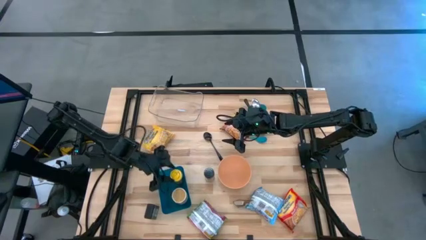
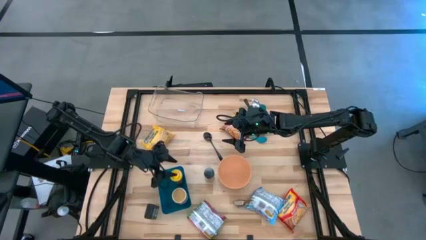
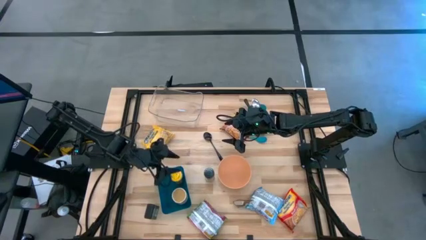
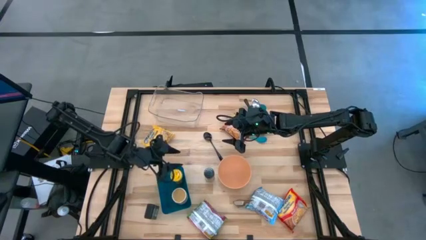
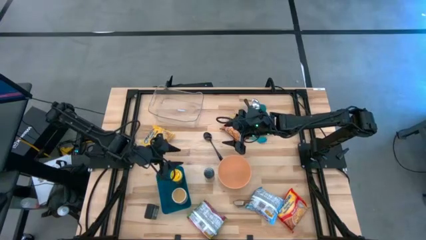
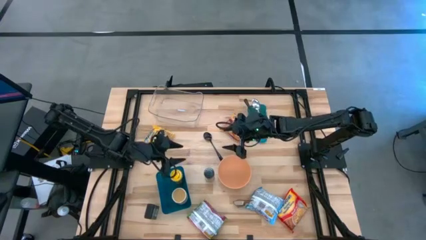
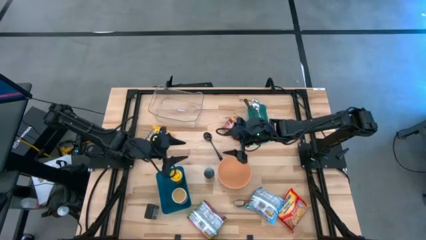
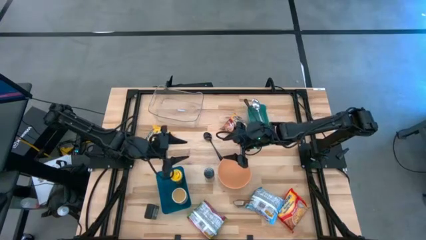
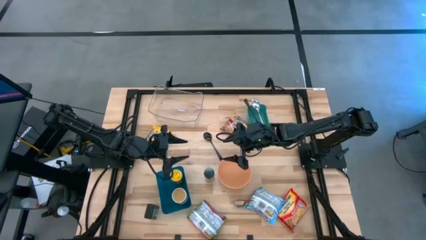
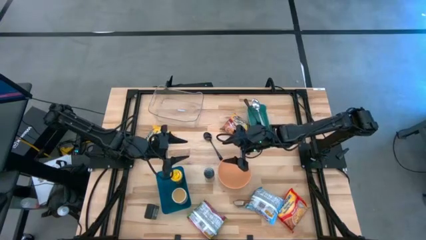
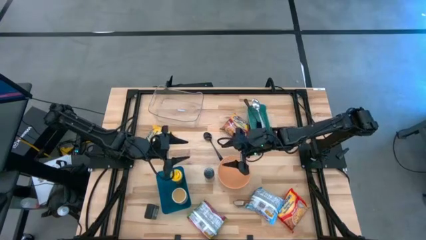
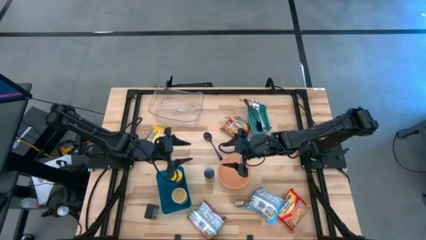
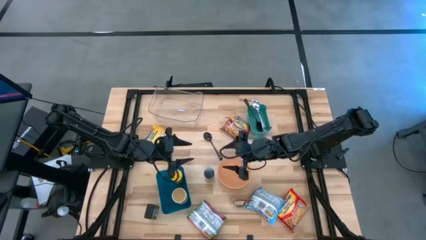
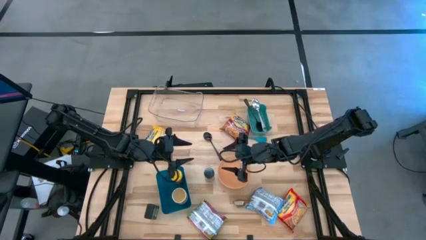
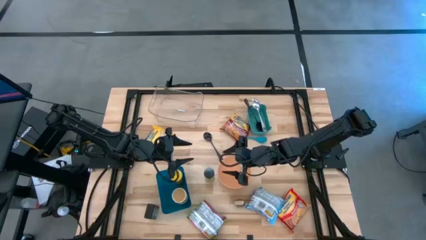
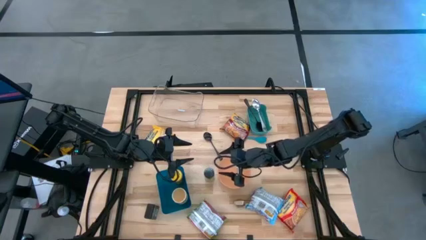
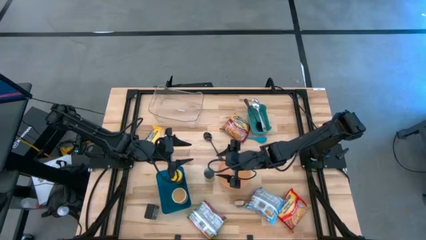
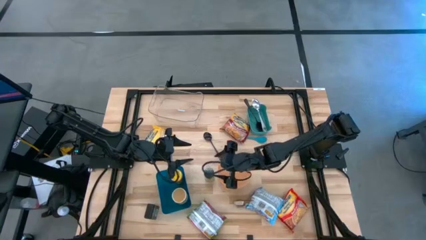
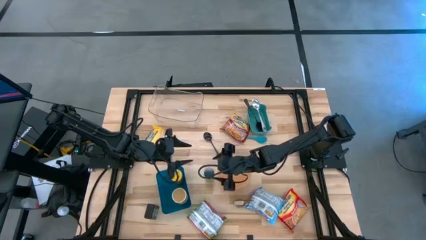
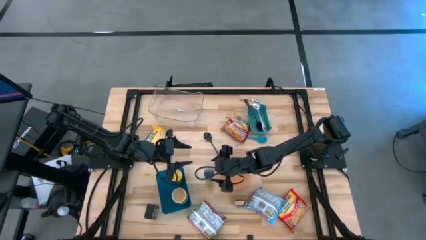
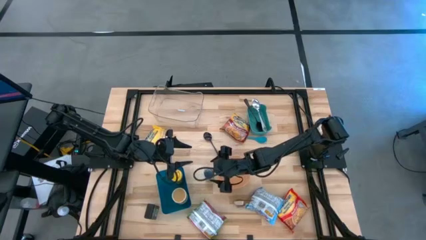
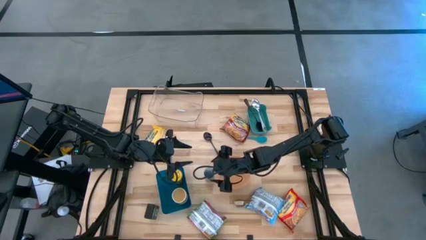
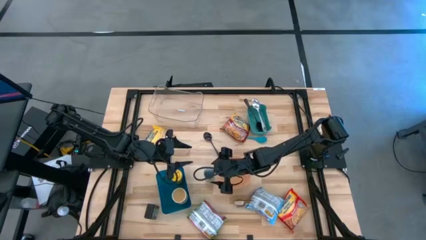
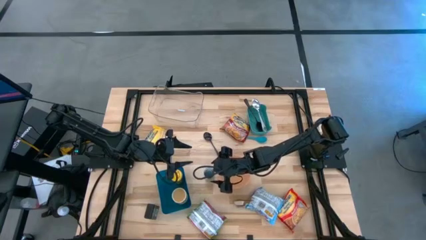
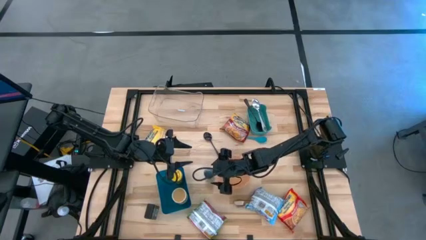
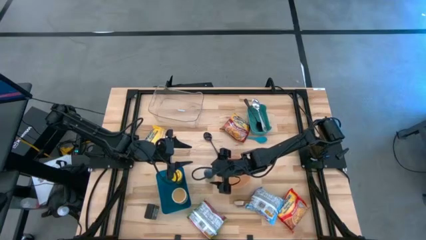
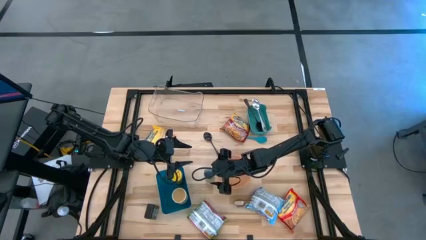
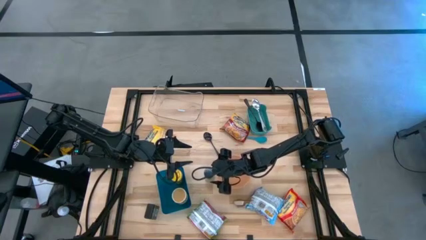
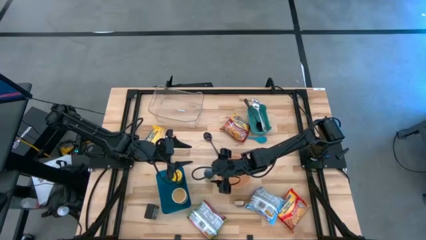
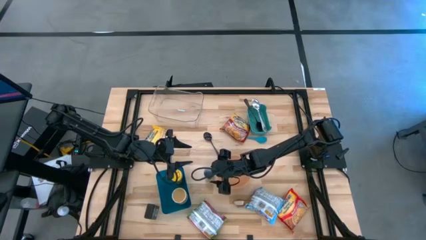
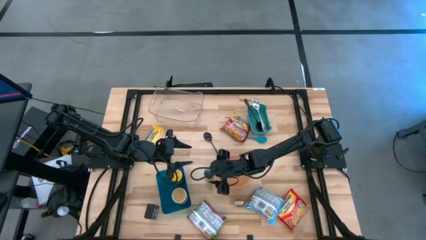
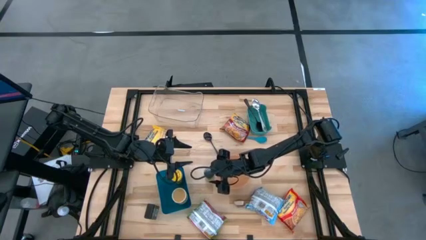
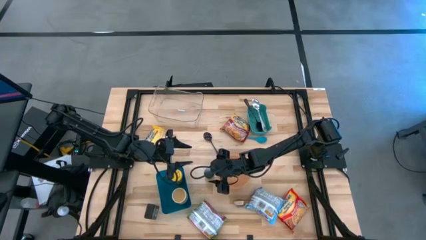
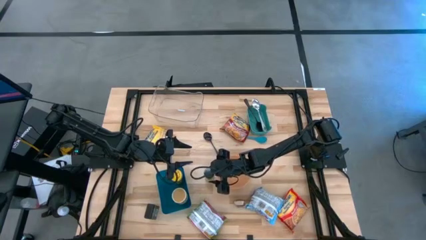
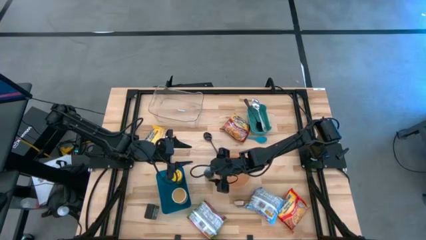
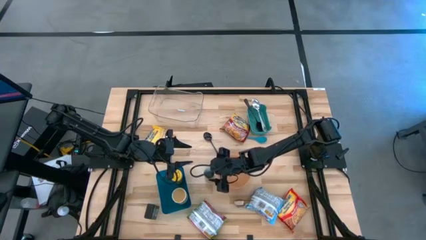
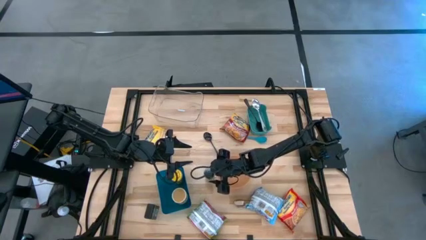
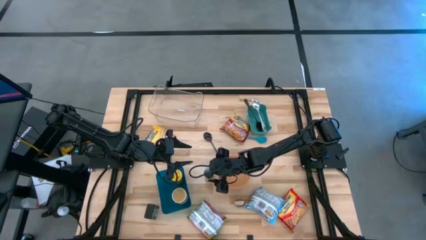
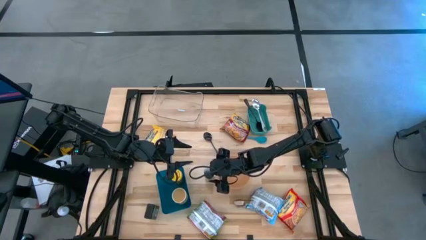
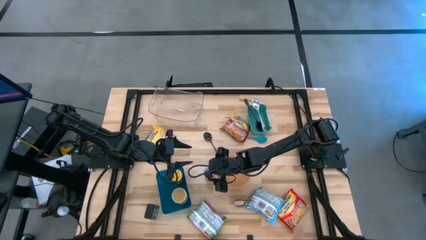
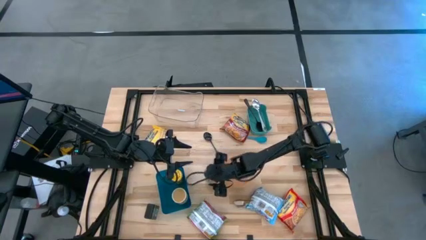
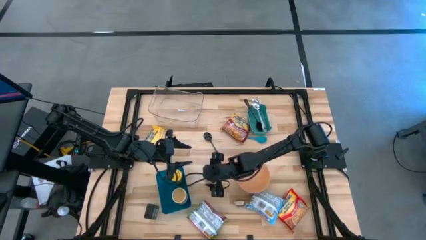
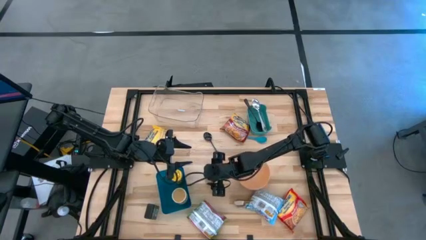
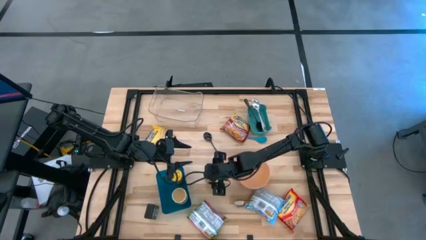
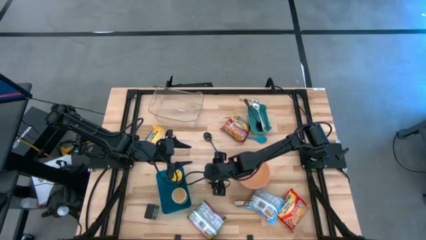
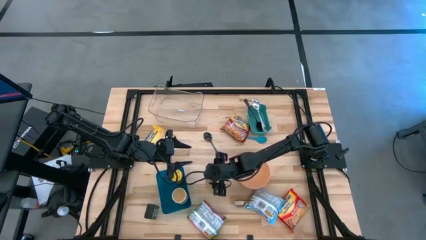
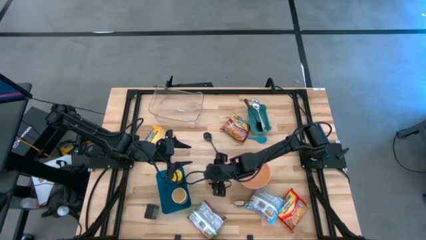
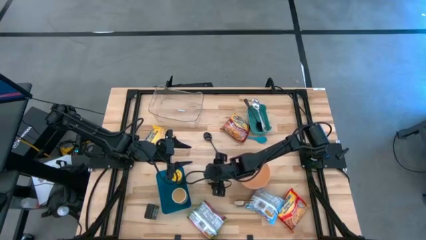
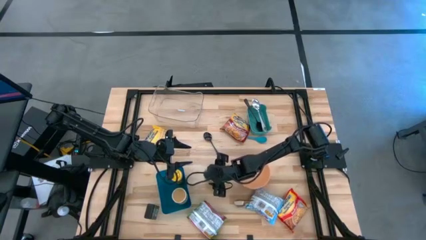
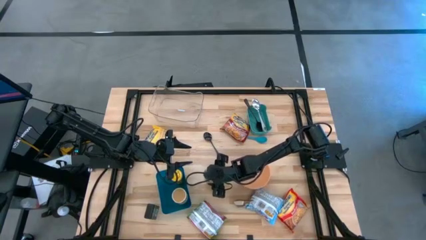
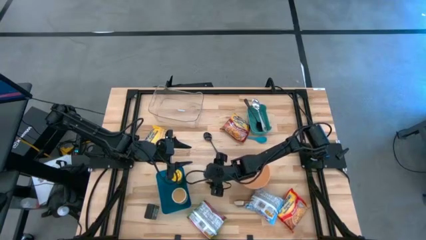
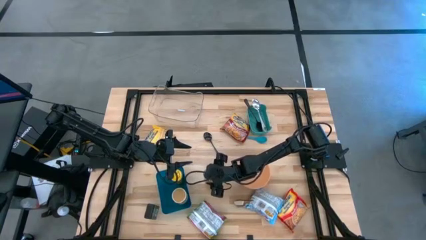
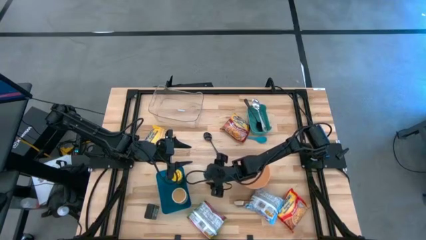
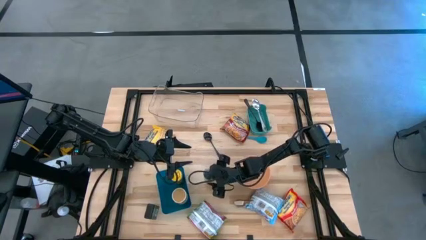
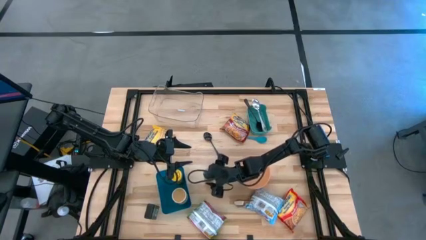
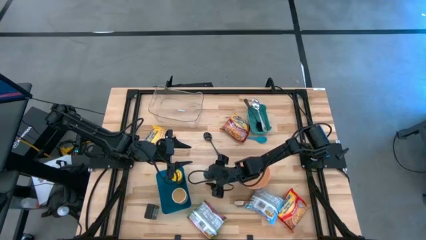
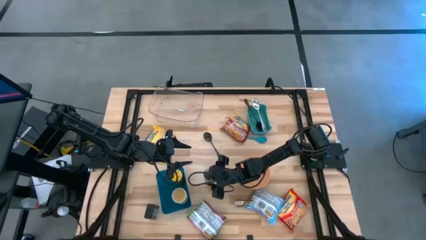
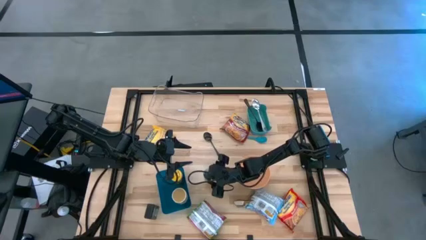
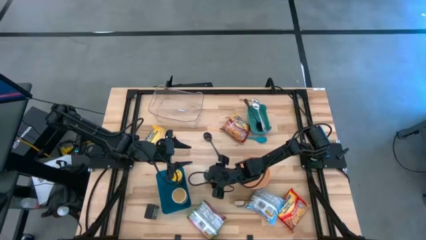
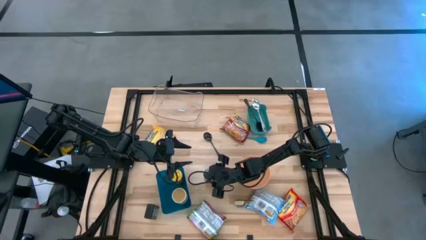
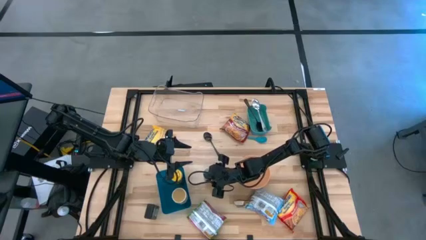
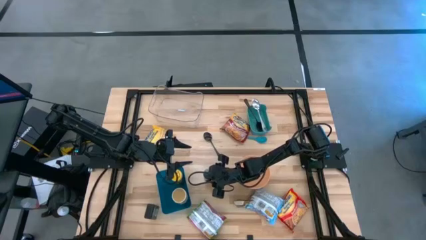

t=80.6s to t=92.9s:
Task: Pick & Place Food Item
Put the green seasoning bottle into the blue bin

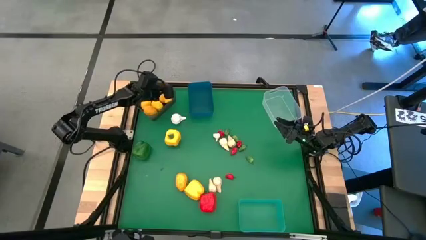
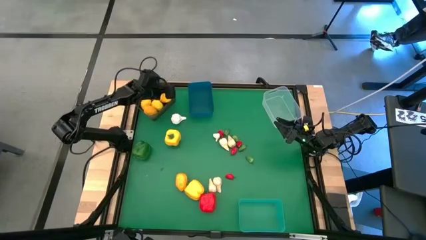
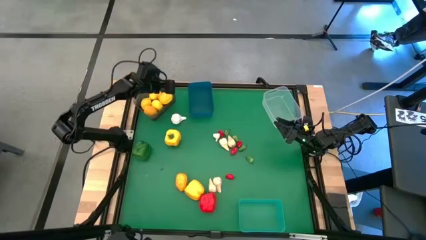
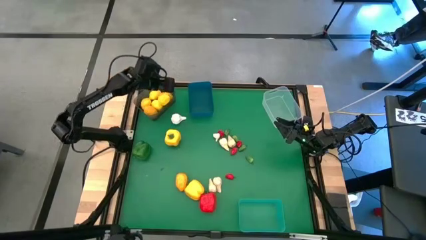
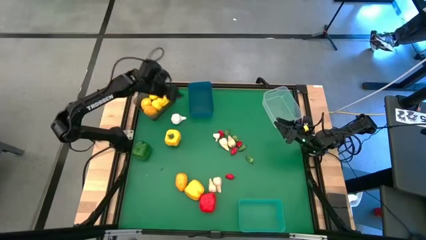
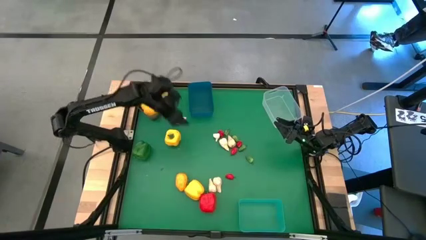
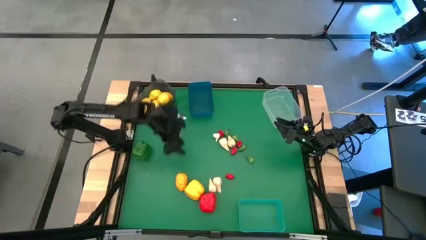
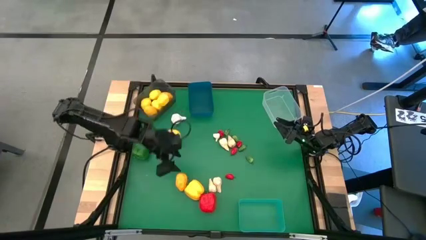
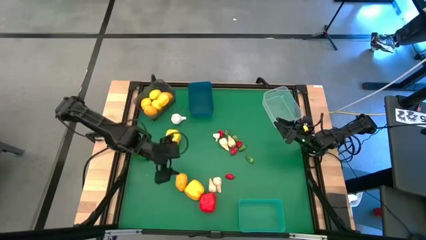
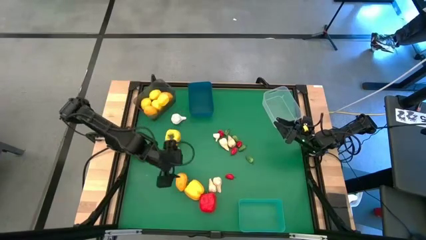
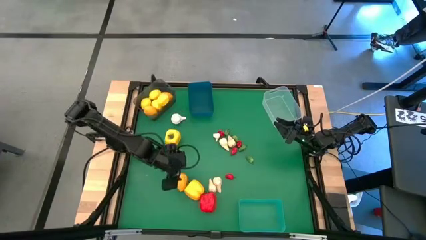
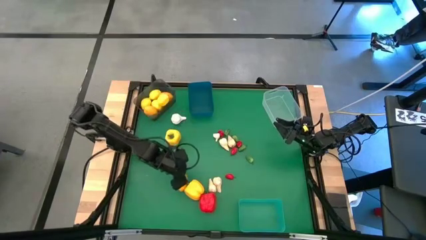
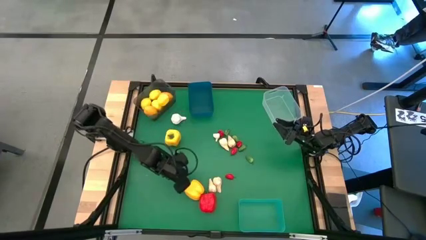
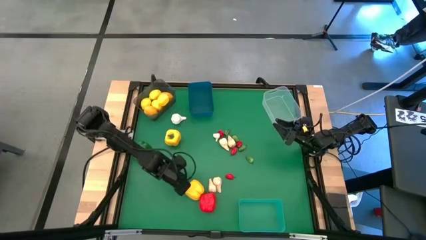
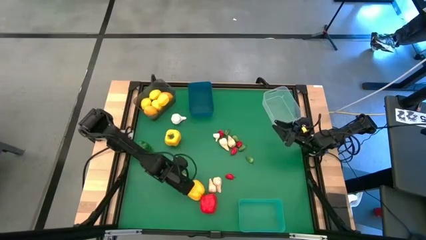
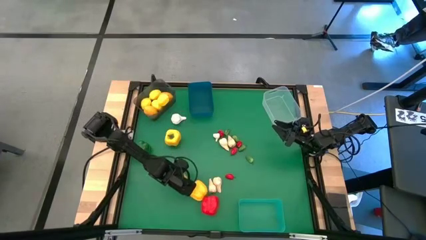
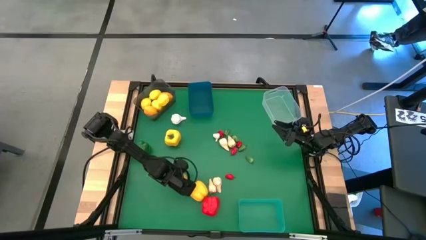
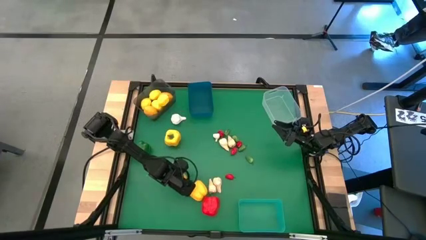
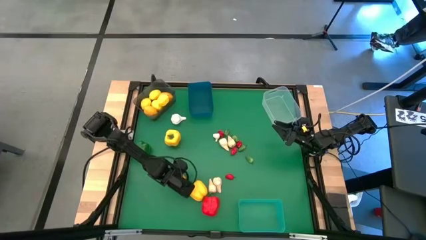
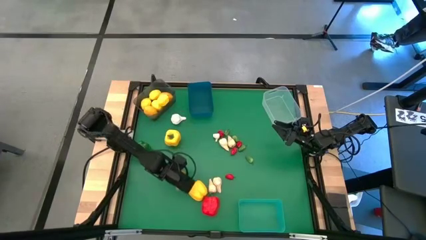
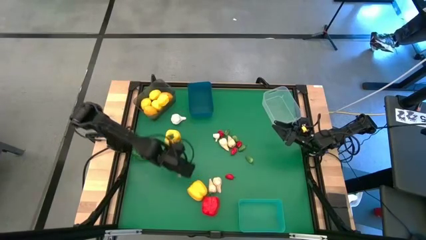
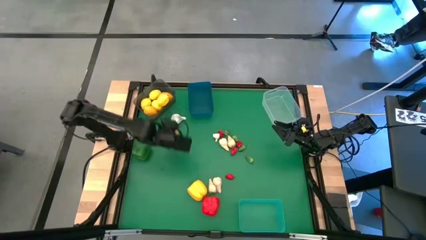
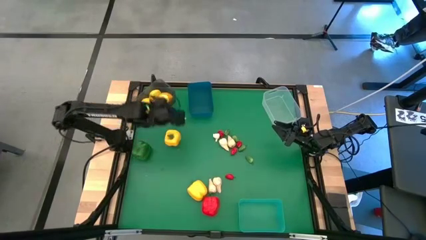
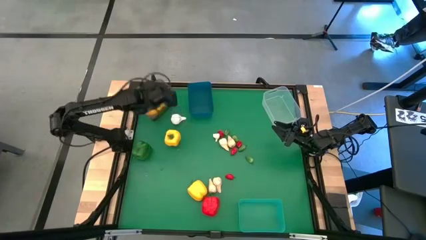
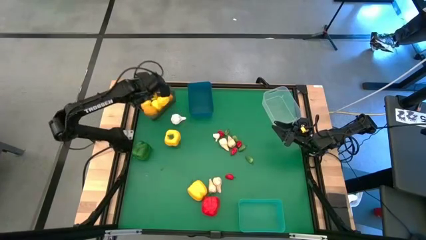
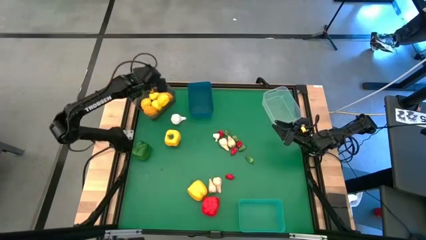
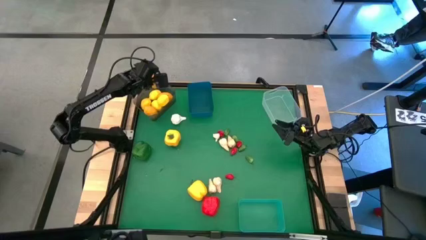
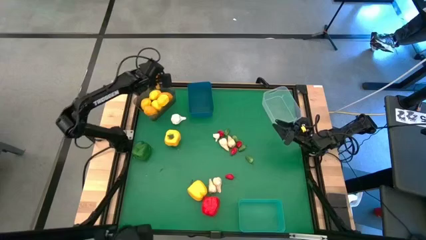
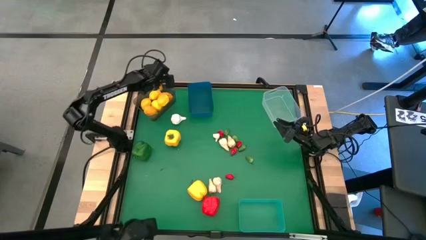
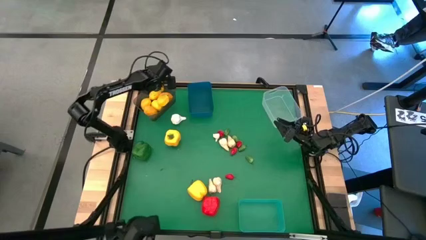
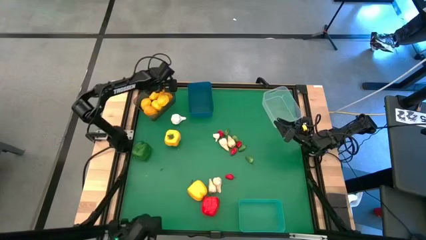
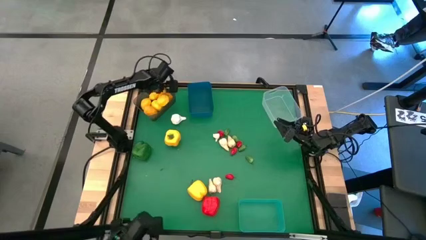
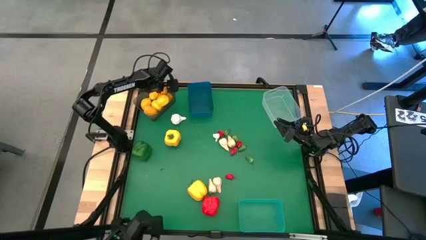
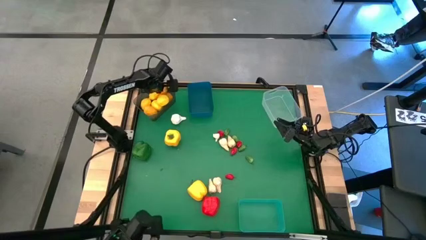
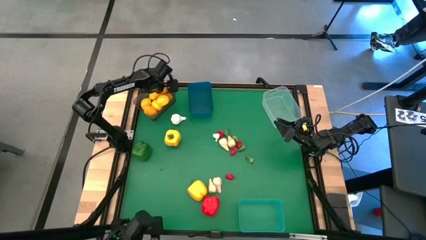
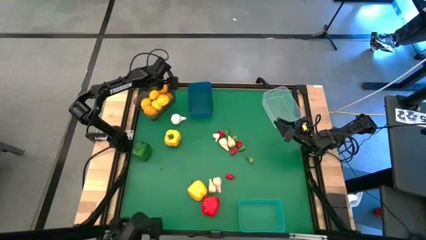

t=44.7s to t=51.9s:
Task: Sort produce into baskets
Put the orange lemon into the black bin
